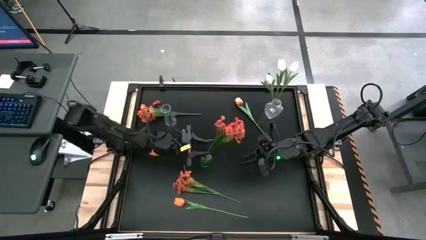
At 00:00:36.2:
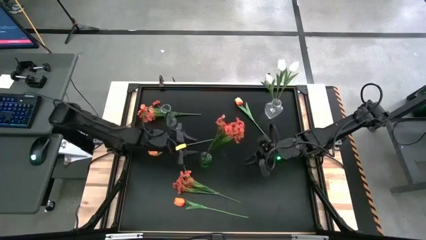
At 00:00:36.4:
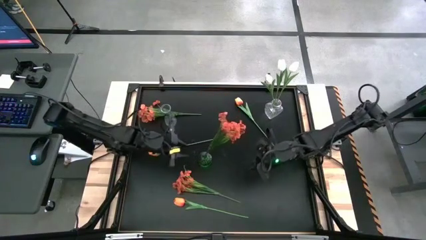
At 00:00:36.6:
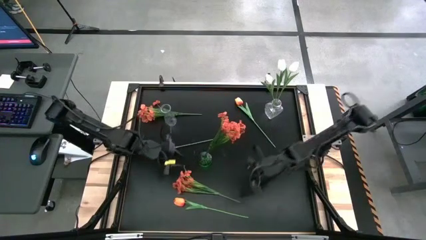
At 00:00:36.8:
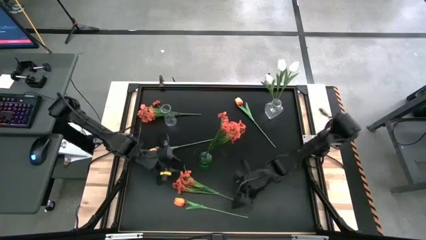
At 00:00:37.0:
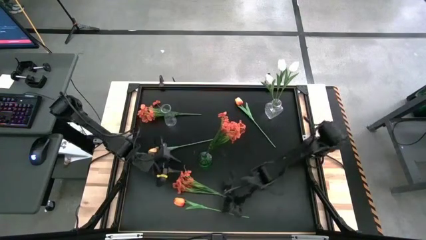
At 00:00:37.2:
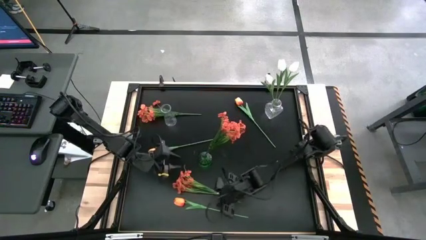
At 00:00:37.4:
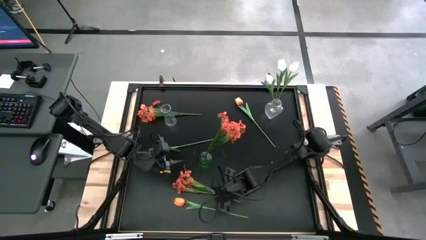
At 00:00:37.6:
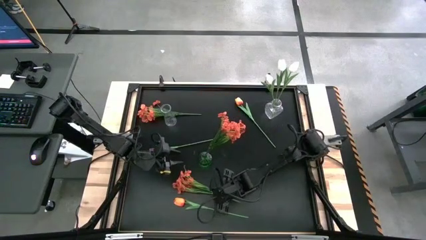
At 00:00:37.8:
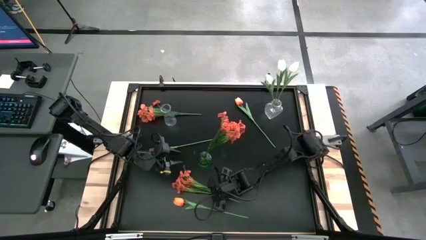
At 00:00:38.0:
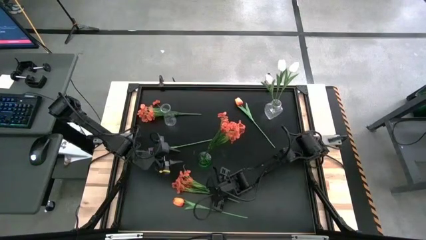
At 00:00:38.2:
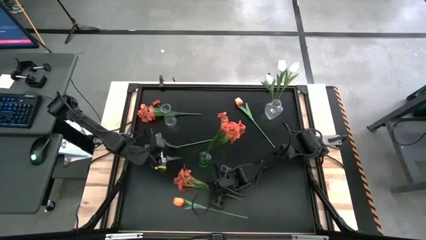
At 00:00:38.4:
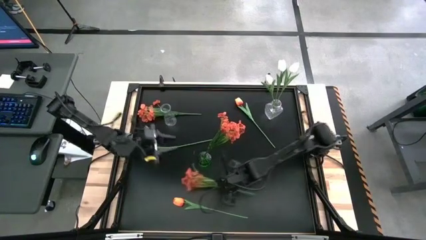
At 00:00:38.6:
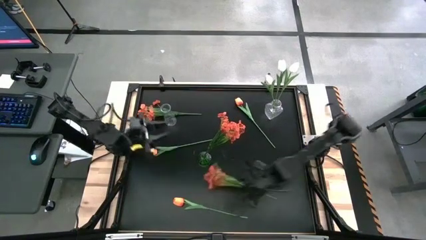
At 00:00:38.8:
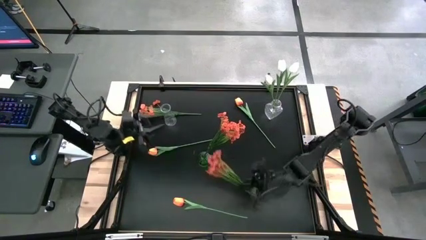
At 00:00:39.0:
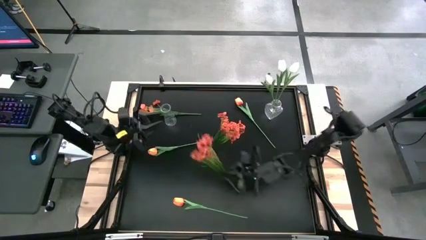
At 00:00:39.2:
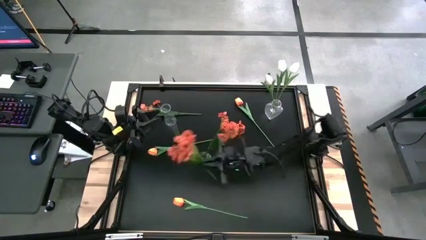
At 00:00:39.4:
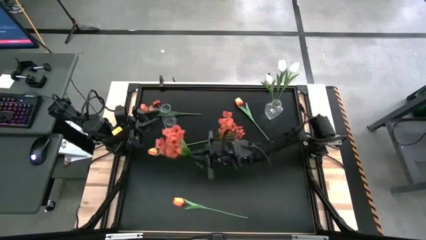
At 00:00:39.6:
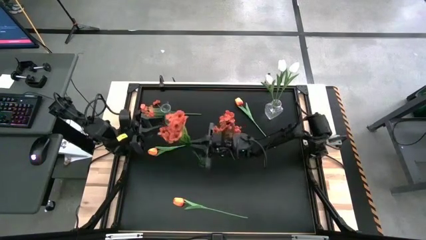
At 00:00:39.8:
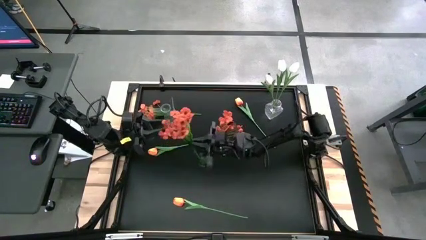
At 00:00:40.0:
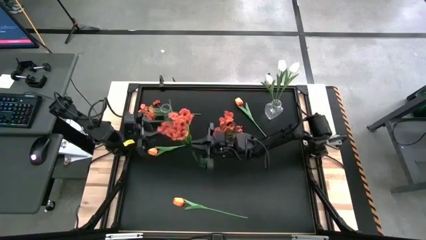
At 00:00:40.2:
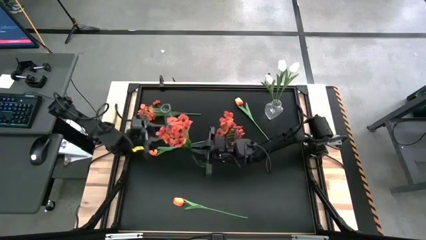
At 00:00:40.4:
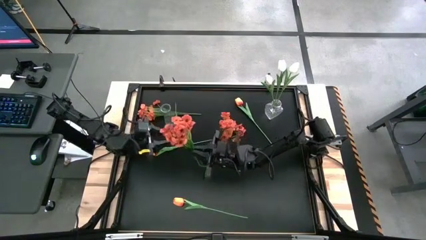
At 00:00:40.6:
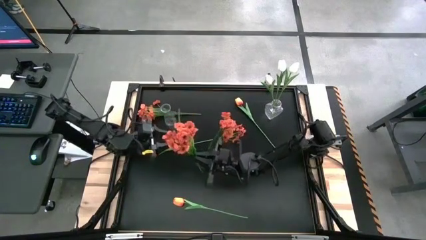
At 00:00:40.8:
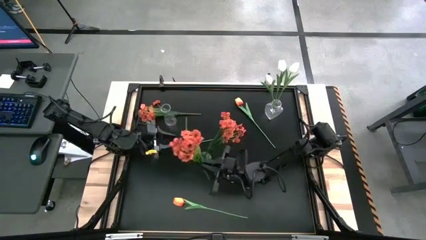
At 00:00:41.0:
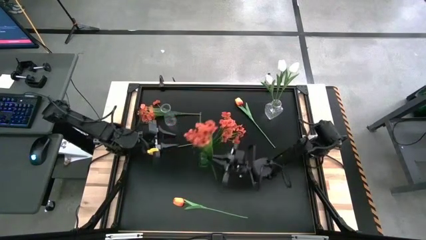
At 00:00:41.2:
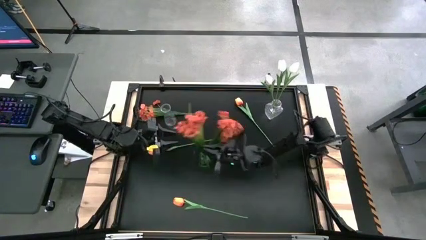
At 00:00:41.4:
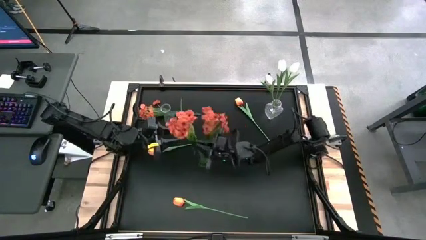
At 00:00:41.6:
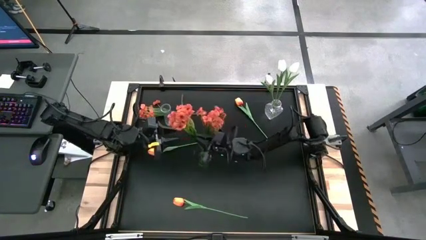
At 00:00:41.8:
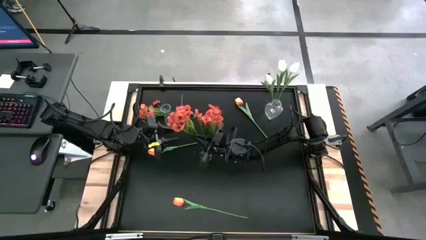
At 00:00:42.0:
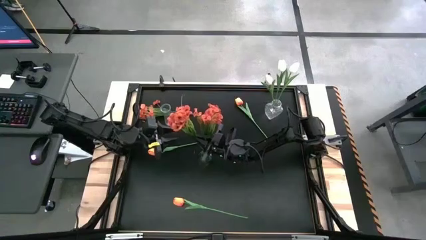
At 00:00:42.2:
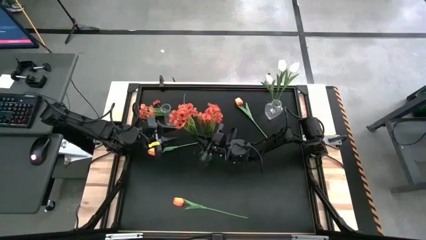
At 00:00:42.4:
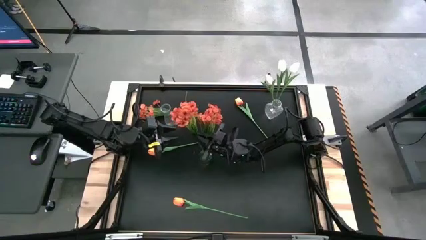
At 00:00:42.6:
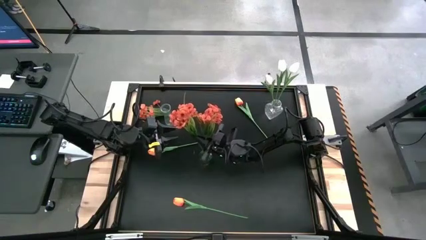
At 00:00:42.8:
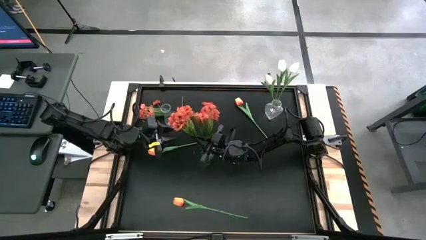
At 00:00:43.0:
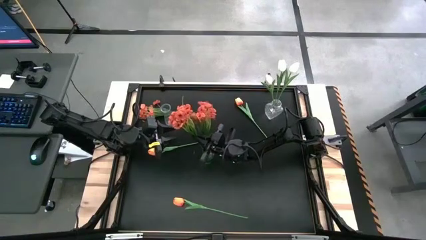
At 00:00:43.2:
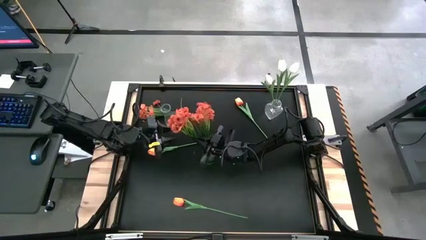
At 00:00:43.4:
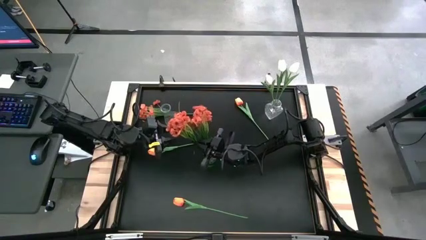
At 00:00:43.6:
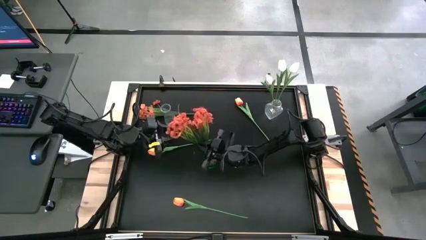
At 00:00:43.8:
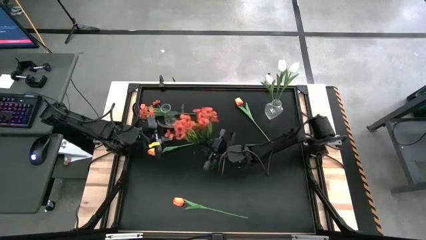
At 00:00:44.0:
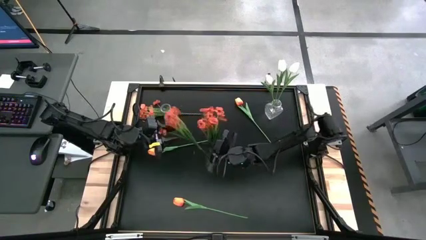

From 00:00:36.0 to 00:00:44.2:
Task: Sort flowers into vase by color
Put the bottom orange flowers into the green vase

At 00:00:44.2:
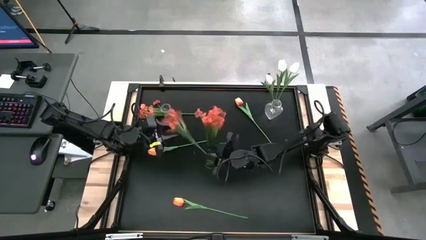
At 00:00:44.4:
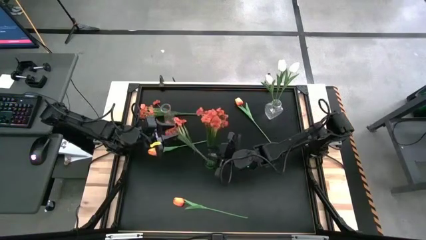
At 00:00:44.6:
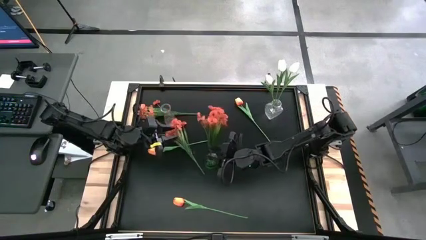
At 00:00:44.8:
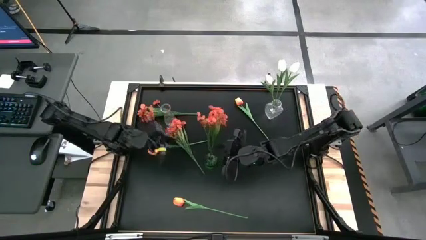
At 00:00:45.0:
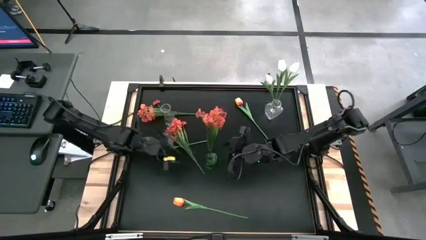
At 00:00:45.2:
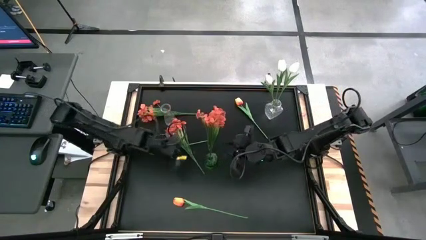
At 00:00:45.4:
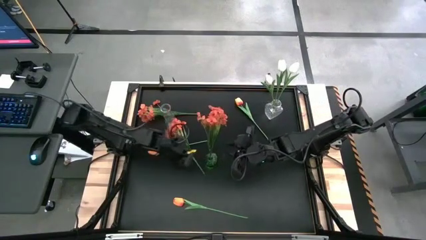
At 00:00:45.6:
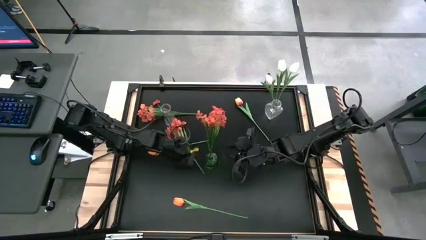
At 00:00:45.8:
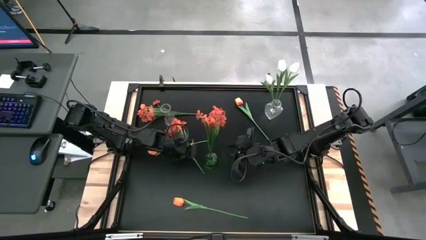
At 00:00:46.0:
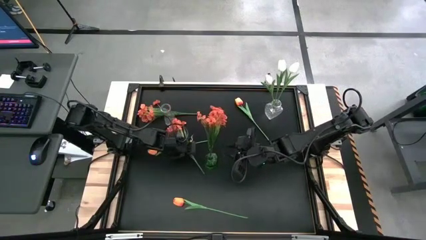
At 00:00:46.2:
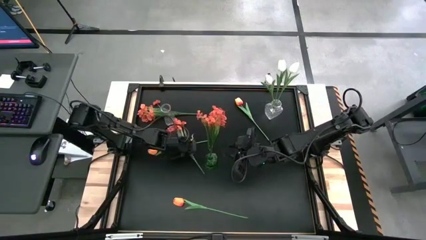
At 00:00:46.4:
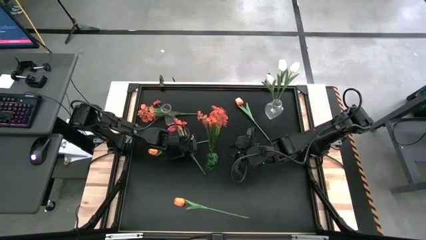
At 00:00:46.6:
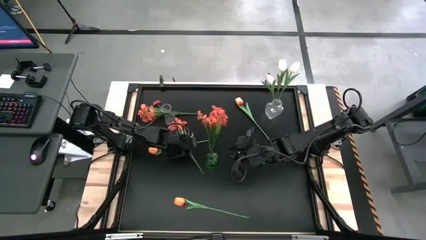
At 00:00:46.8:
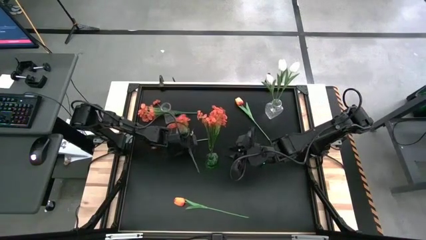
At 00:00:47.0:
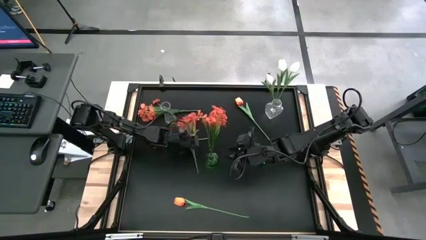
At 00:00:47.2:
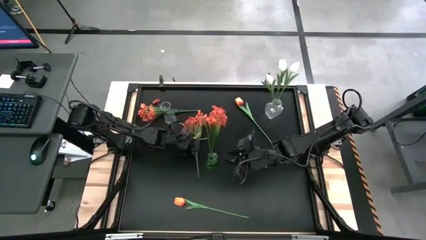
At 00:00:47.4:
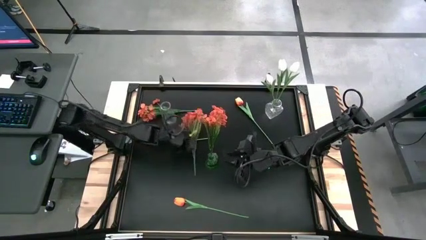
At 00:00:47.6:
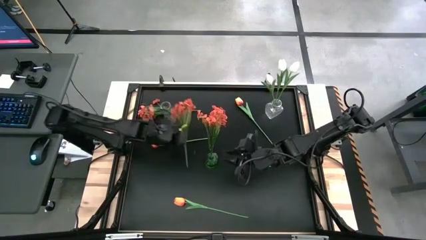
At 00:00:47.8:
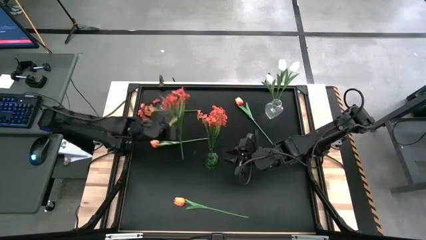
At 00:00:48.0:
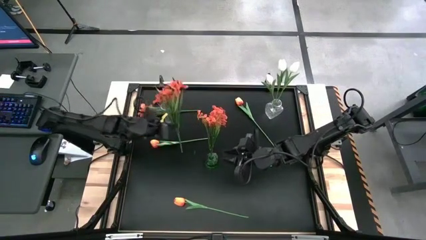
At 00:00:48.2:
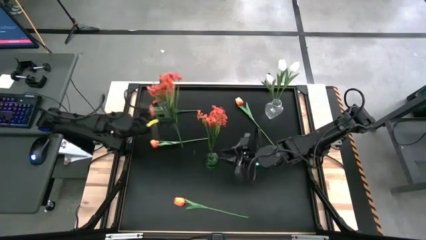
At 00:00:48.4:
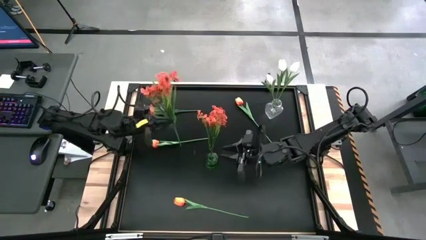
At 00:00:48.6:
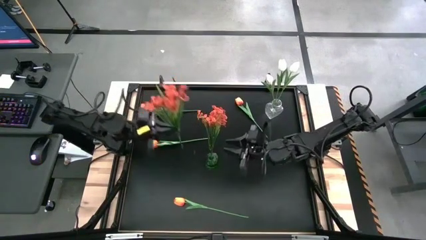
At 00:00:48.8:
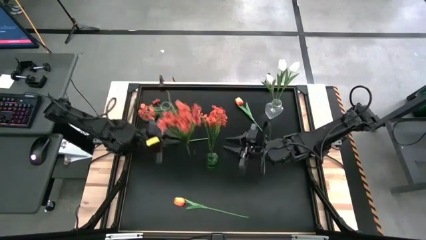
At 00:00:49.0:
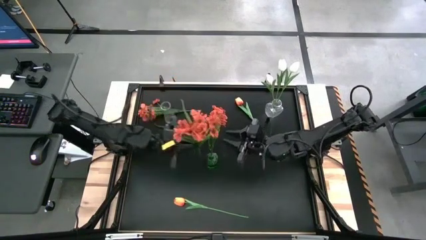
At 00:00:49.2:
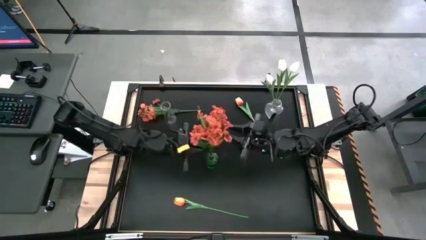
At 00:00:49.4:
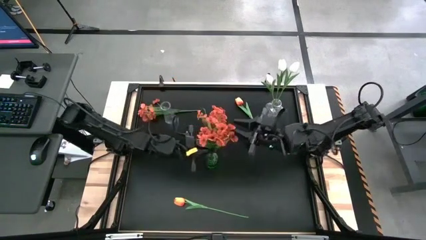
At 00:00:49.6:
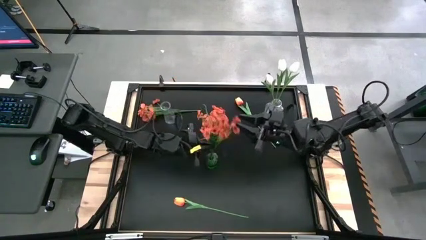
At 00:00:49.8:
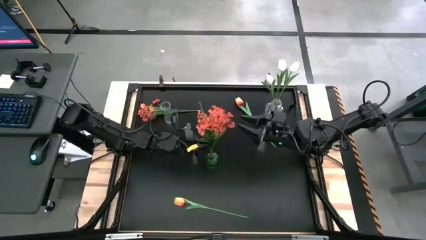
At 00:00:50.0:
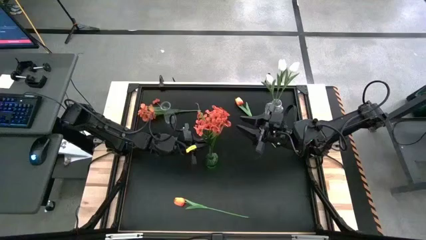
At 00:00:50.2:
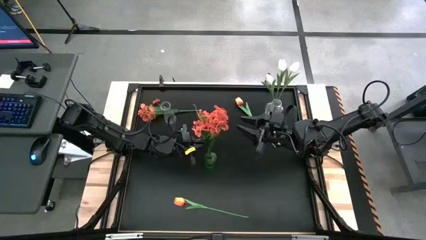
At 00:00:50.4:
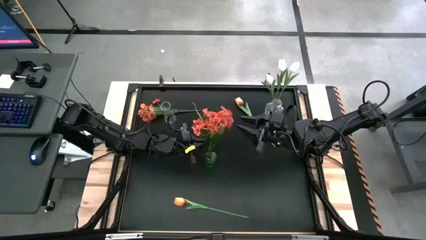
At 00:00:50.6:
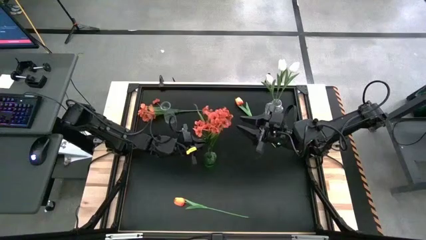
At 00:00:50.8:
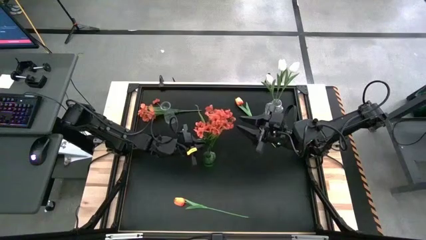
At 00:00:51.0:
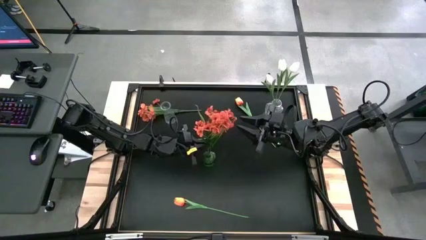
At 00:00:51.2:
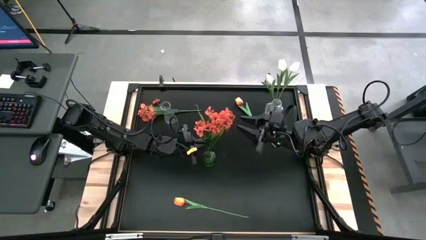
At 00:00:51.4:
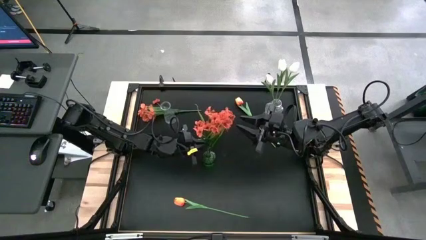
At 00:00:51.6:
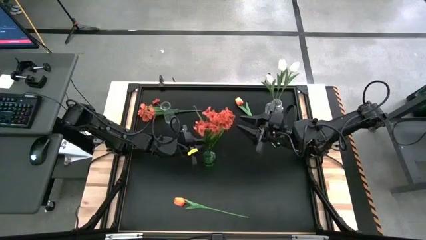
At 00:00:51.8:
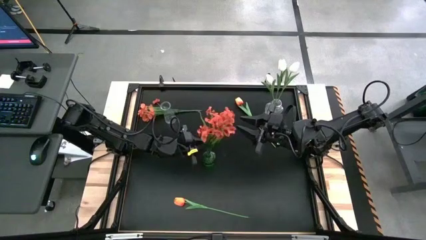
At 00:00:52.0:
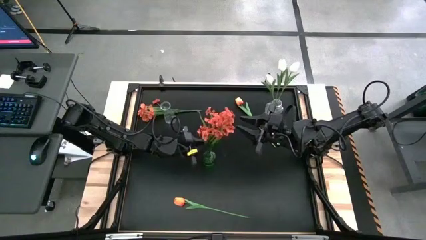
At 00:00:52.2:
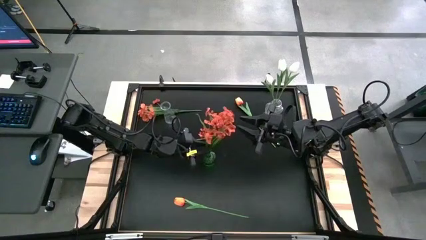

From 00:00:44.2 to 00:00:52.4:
Put the bottom orange flowers into the green vase
